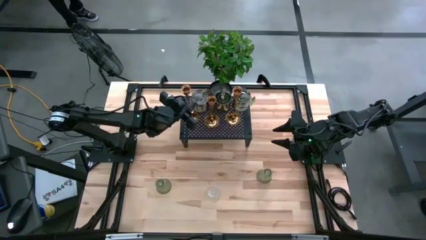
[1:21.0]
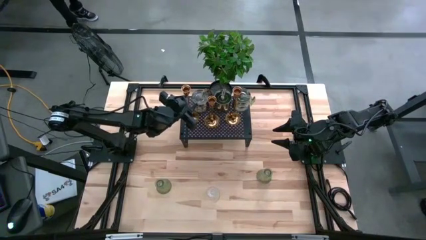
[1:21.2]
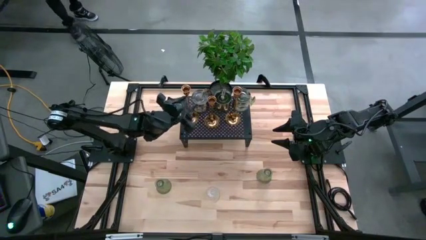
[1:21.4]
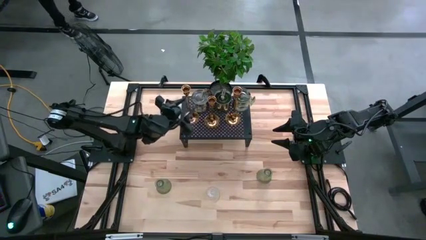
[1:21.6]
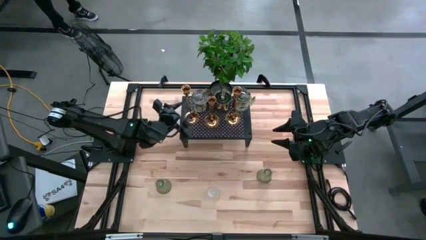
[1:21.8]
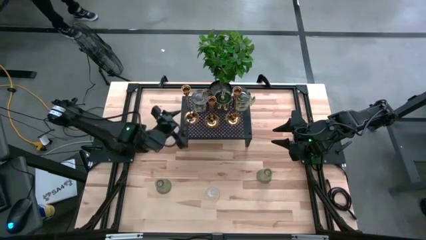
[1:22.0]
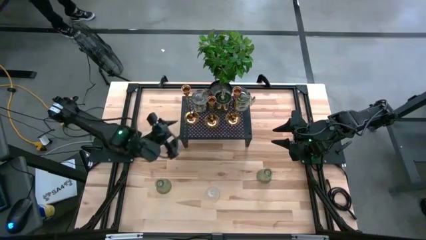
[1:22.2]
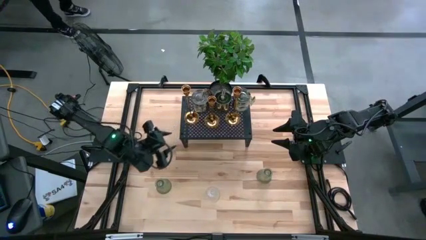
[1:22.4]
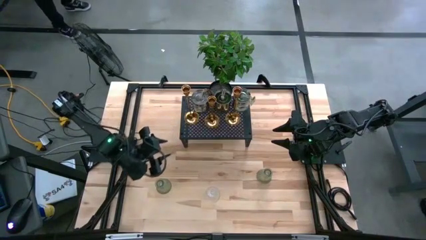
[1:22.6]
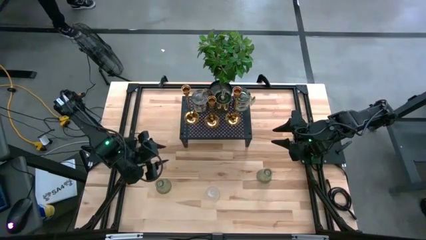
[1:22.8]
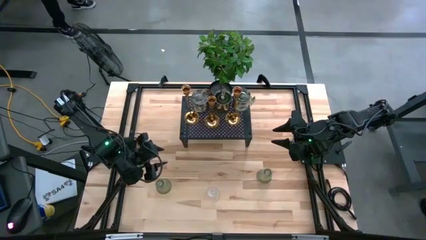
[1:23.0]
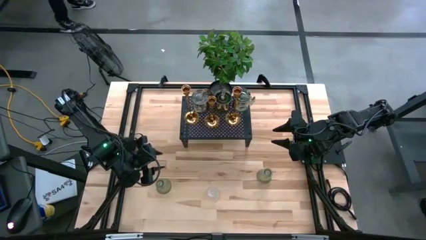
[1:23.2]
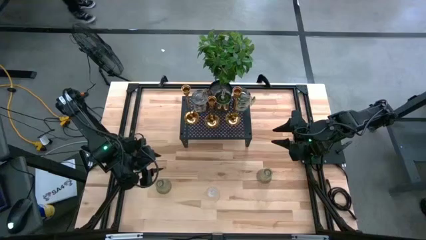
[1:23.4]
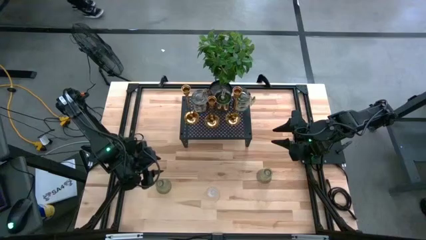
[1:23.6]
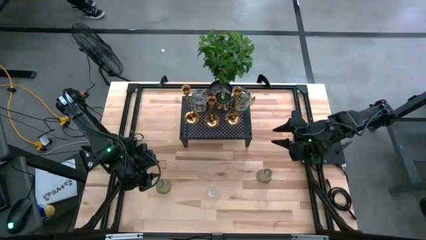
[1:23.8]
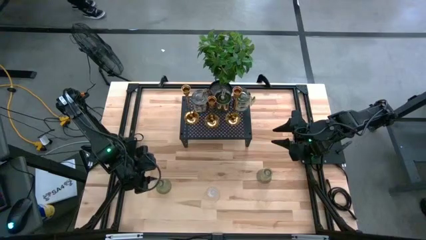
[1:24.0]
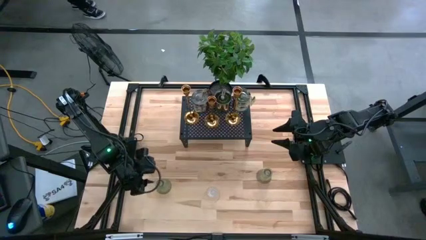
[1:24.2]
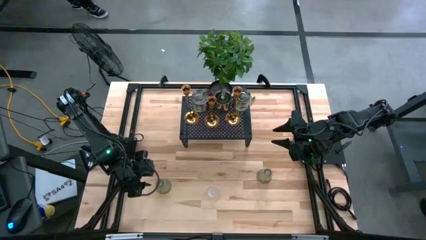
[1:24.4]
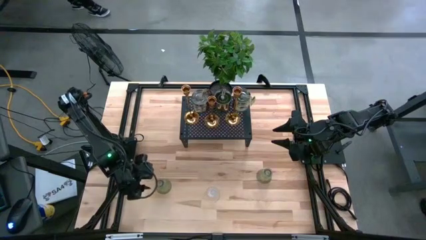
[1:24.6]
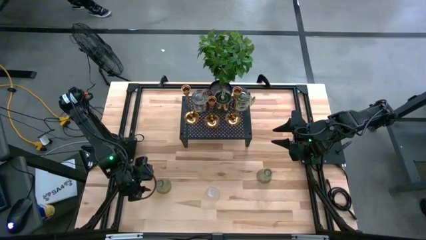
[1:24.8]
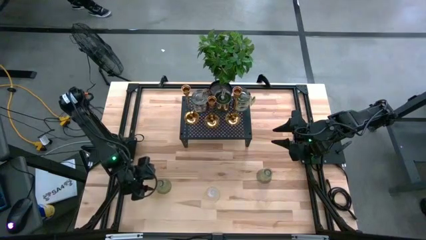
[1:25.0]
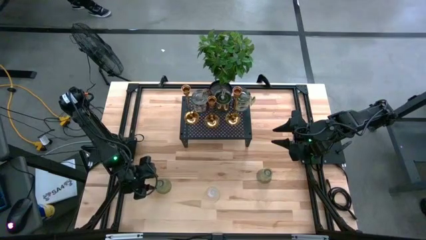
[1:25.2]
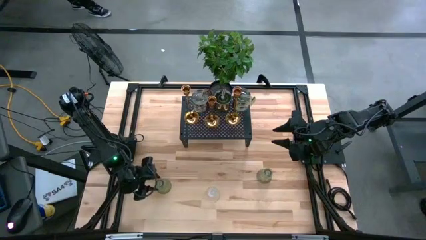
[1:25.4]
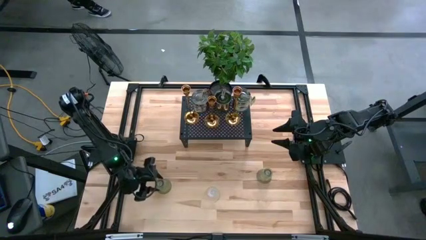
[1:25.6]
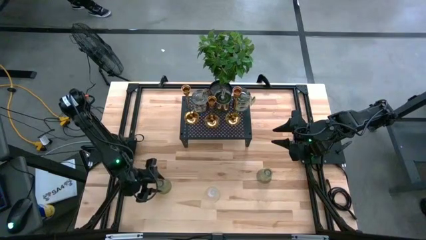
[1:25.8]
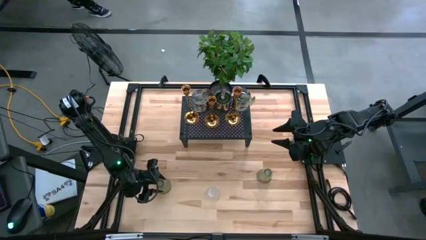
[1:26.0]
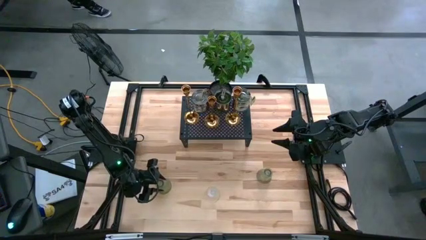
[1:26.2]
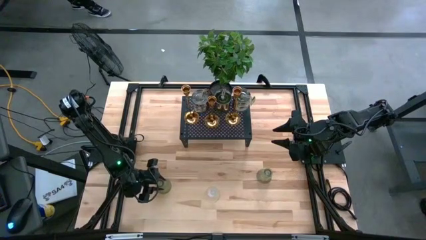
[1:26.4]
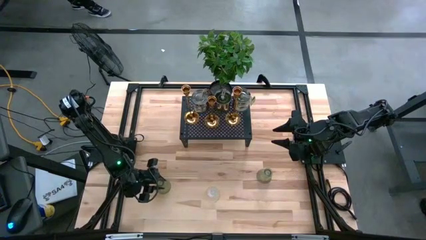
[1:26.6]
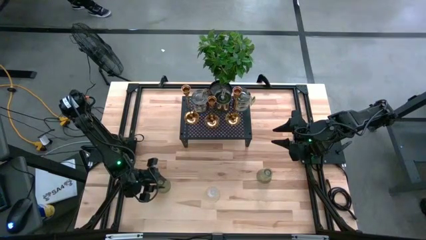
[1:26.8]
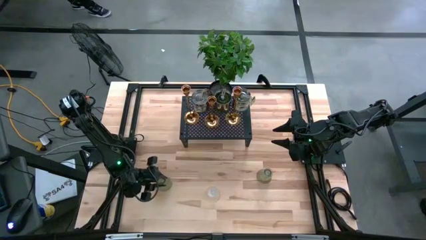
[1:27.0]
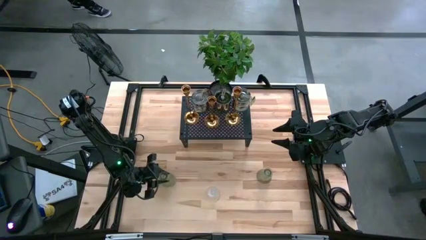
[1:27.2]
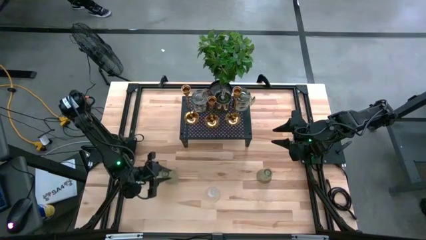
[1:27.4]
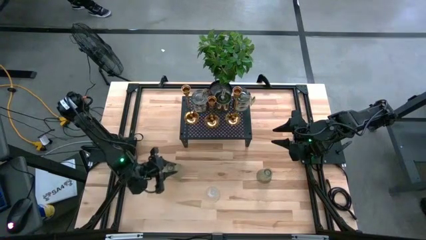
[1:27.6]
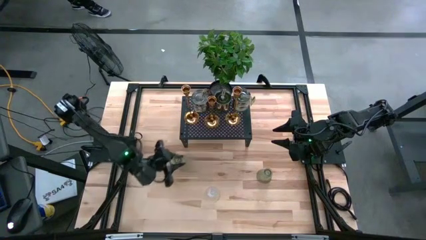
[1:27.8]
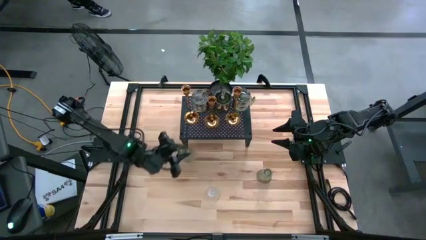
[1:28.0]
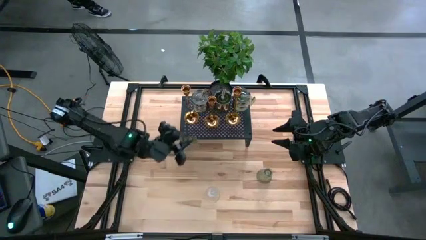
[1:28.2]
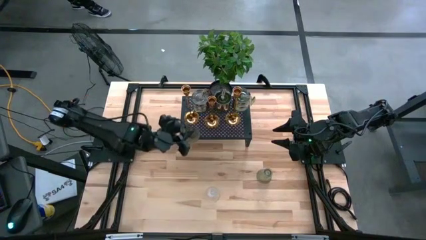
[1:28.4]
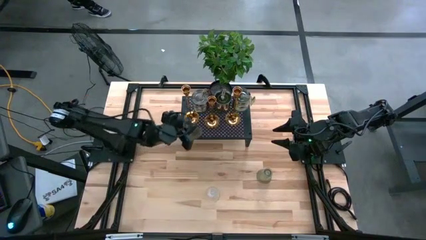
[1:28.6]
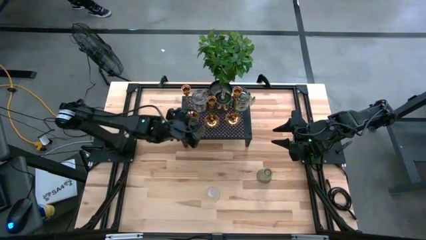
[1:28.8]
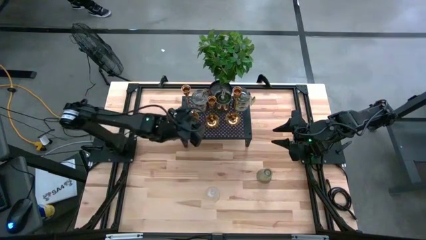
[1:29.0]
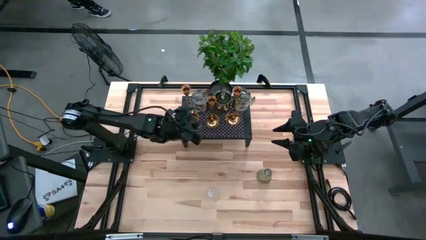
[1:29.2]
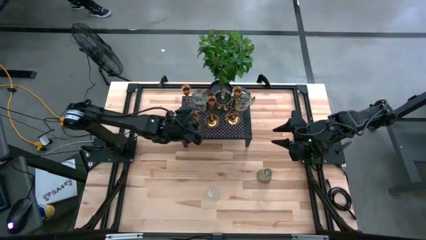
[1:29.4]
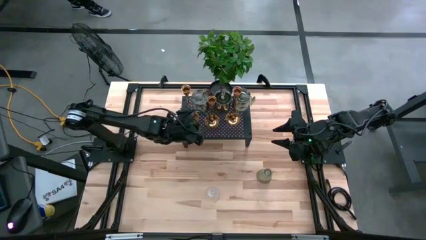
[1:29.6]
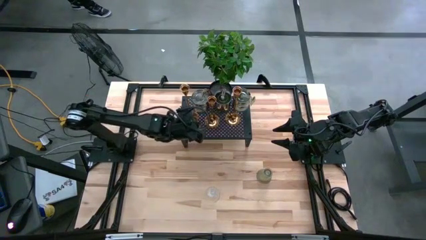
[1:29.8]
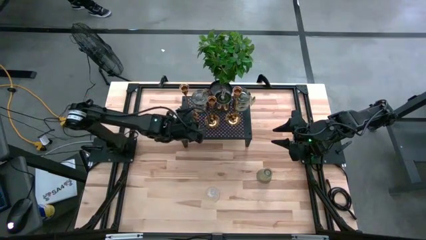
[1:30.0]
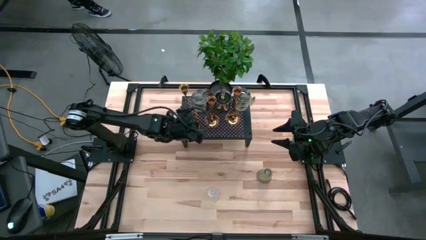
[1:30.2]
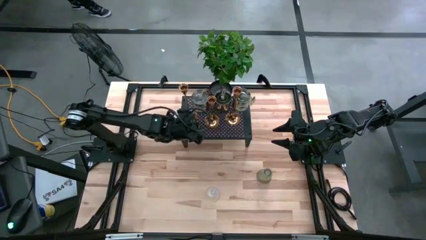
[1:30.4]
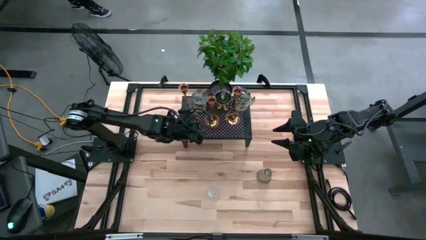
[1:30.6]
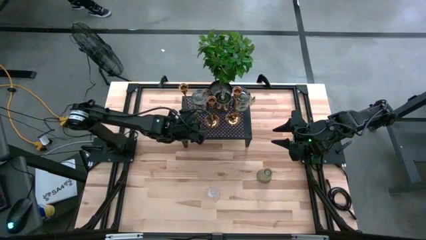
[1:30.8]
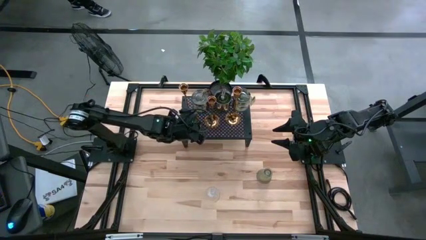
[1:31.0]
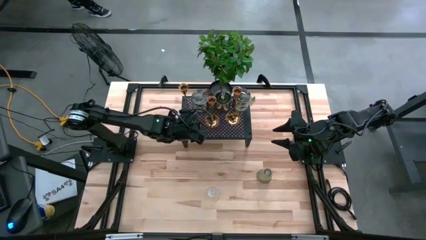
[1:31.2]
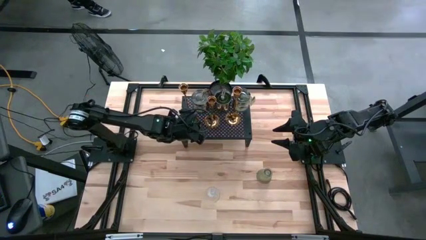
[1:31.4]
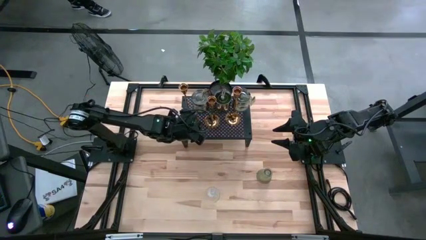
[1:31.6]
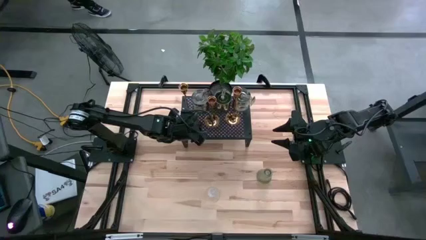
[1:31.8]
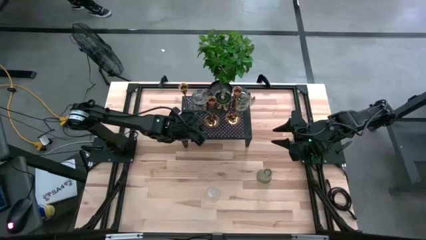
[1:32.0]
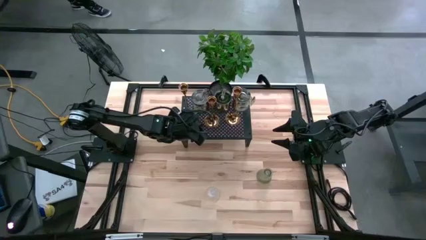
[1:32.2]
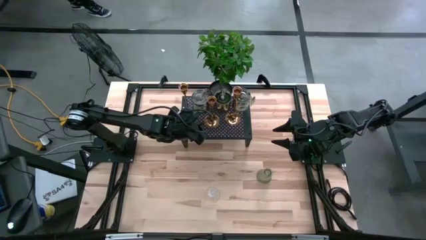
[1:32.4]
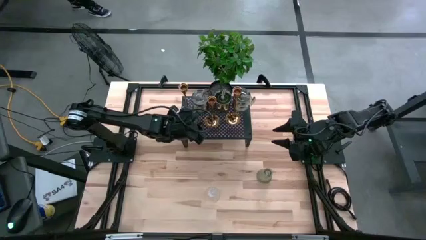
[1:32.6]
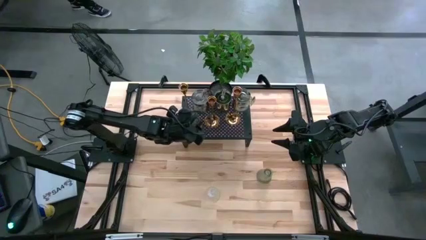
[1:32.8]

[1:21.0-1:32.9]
Task: Pick & Place candle stick holders
Put the left green candle holder on the shelf

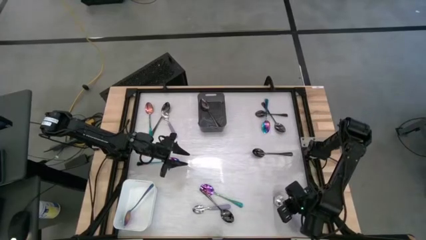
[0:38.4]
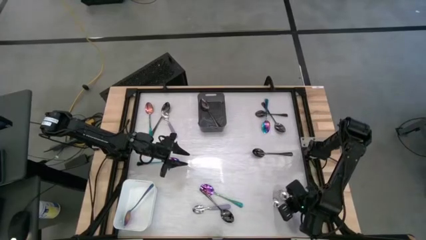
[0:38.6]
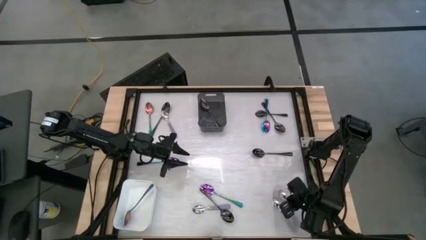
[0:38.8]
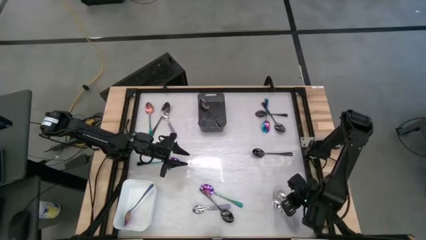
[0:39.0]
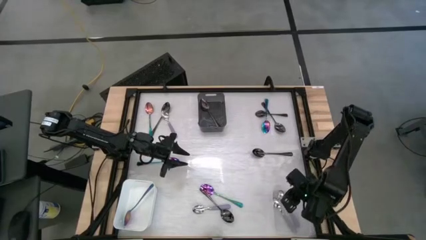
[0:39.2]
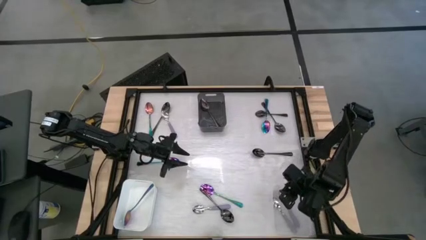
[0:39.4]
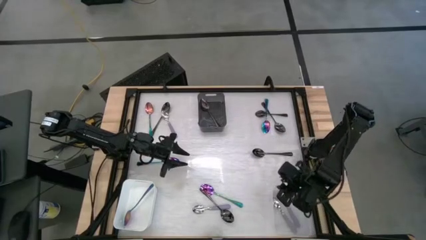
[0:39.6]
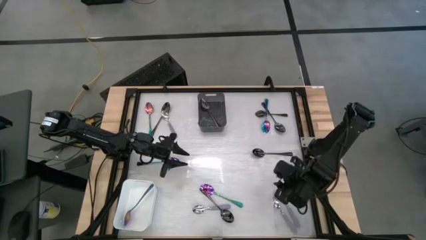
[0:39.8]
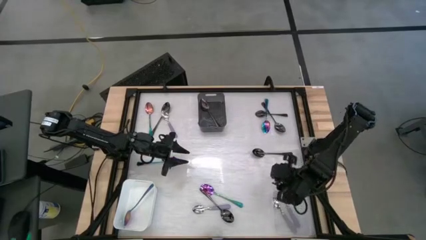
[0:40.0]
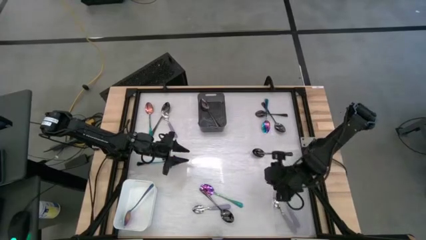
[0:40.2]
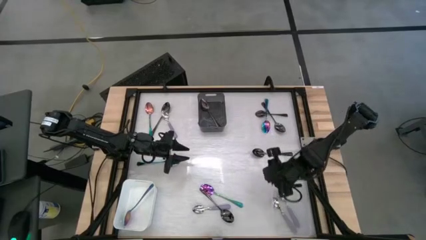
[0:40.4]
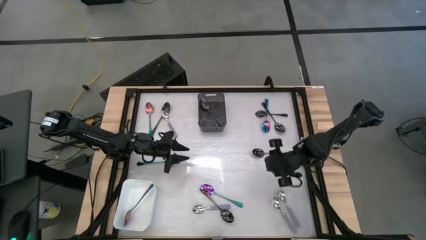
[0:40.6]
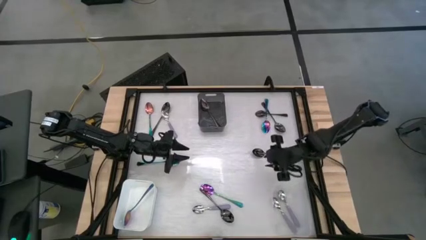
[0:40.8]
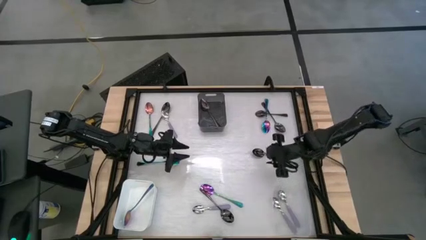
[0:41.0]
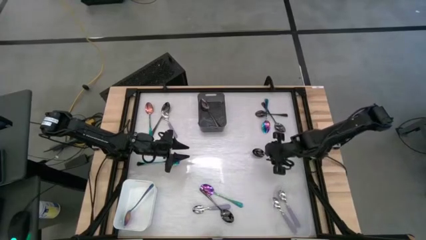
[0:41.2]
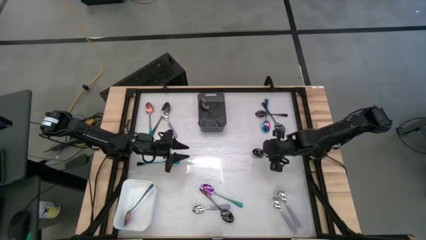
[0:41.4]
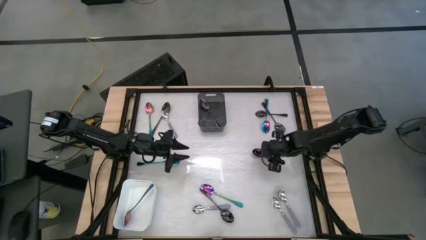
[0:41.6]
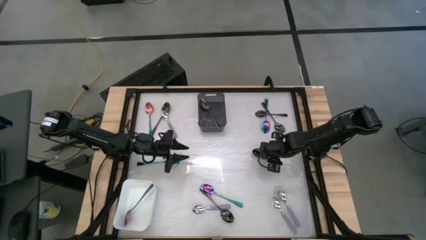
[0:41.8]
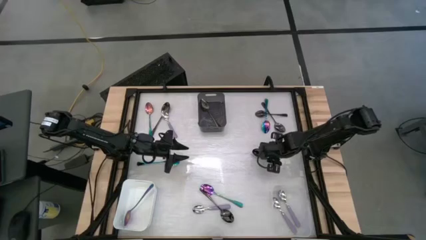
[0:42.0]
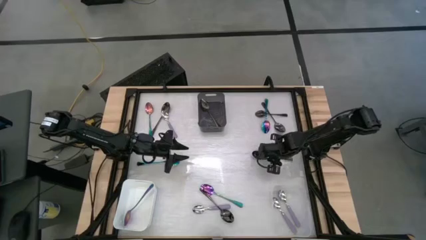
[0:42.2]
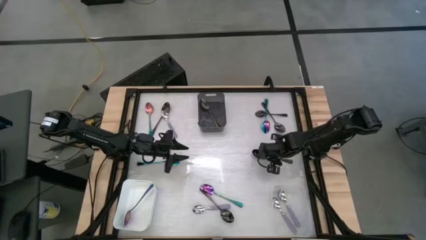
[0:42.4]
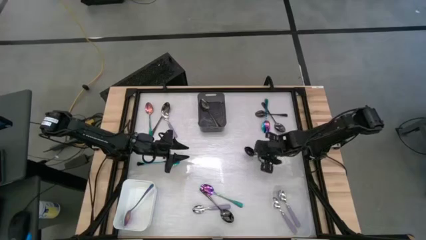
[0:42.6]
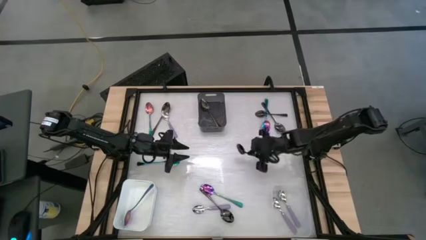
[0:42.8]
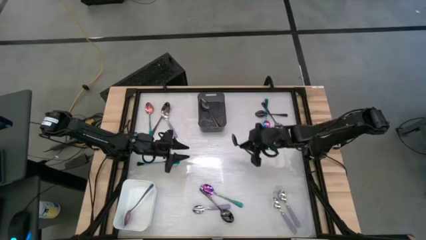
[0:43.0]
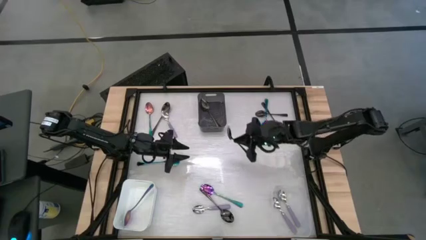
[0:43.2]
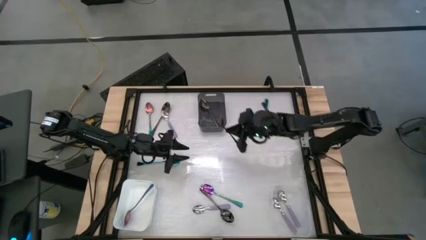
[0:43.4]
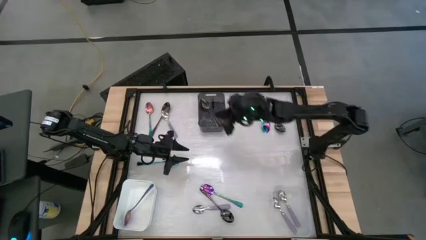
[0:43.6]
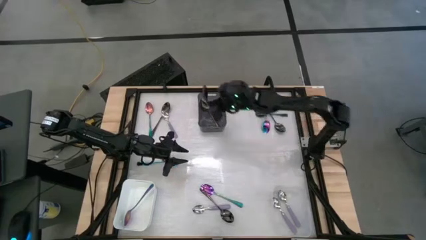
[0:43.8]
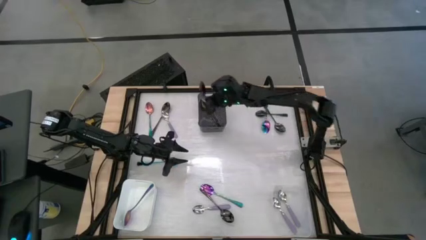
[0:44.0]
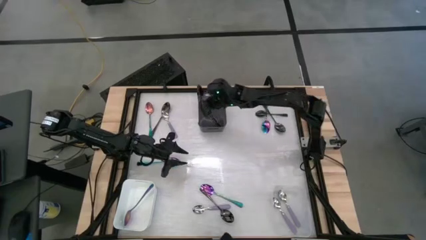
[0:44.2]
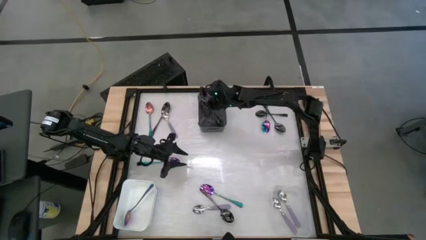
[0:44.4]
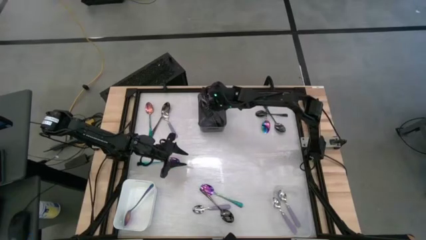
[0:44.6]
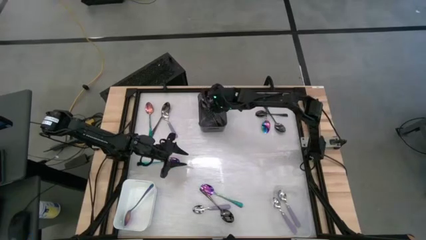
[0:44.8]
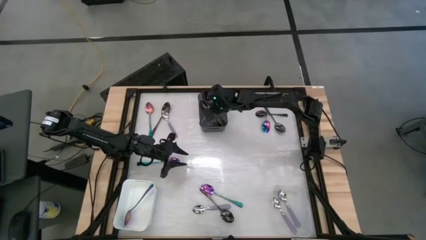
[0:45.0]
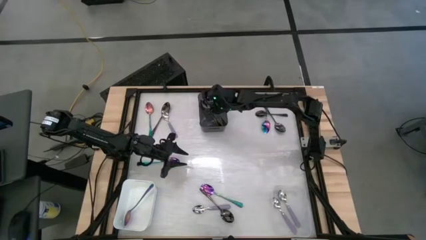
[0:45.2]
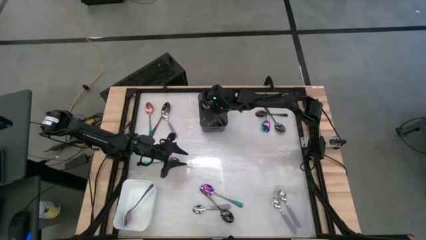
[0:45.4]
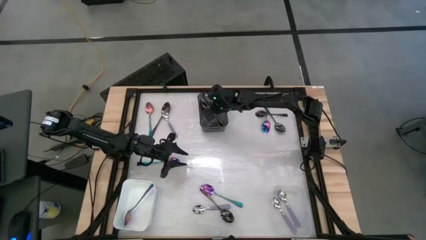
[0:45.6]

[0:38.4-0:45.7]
Task: Sort silverware by color (type)
Put the black spoon into the black bin
